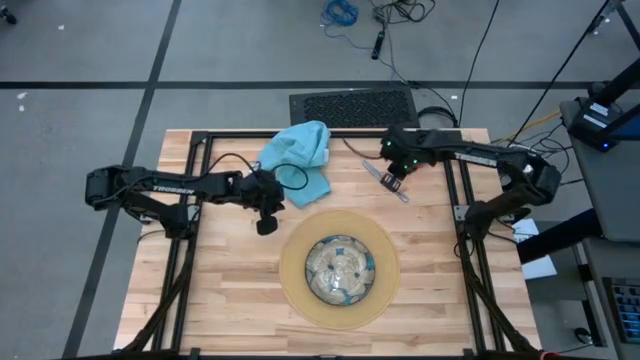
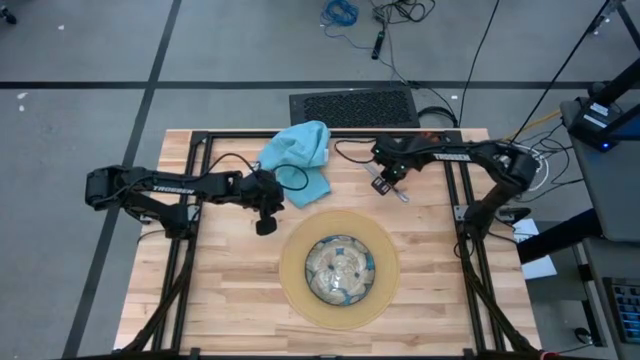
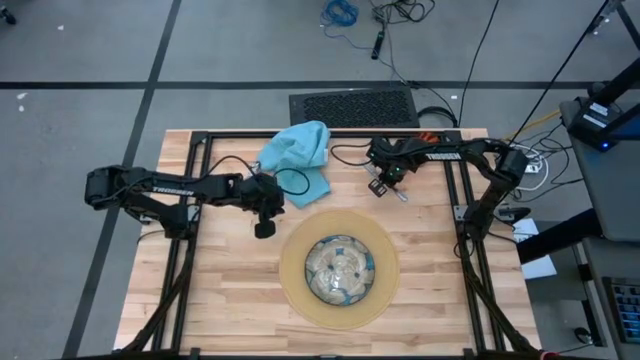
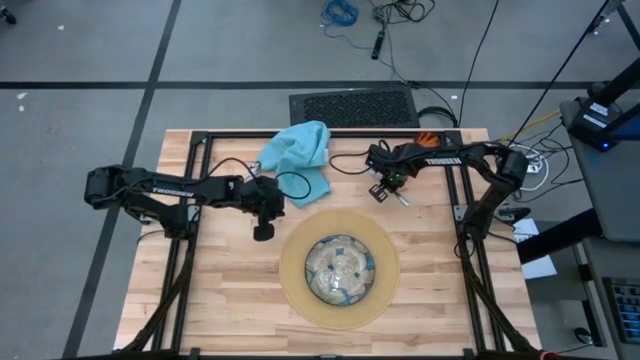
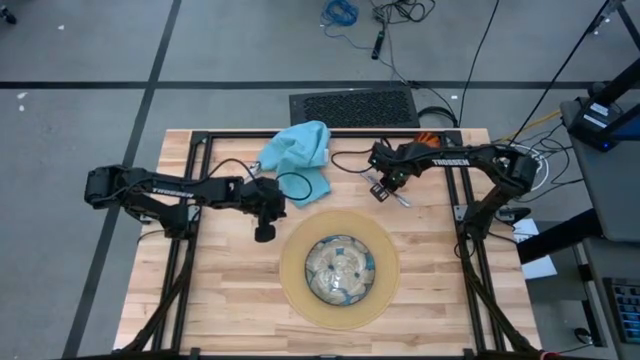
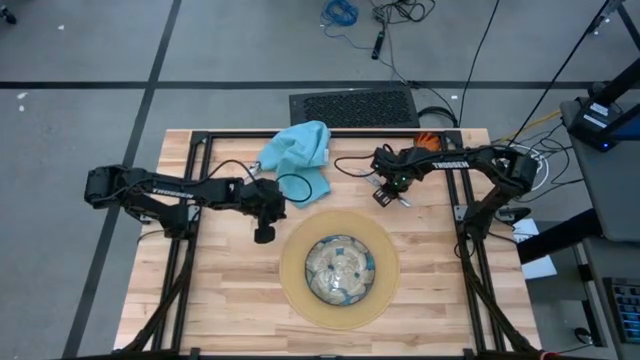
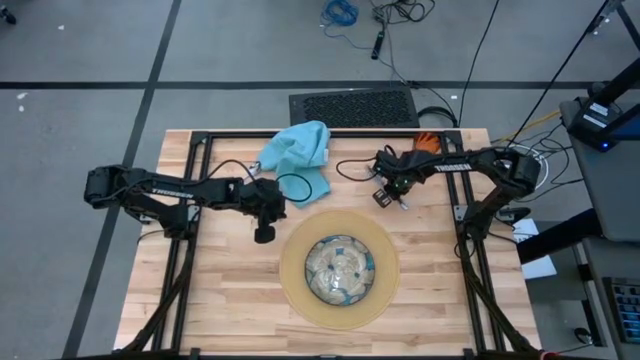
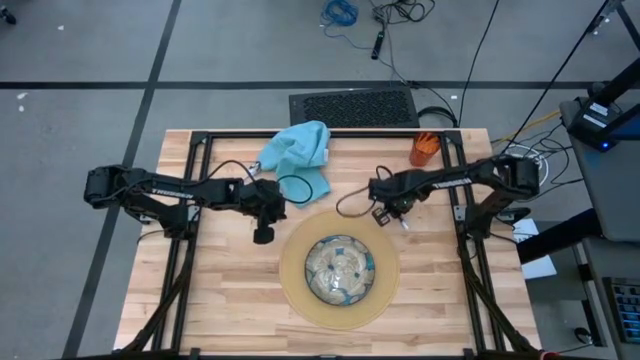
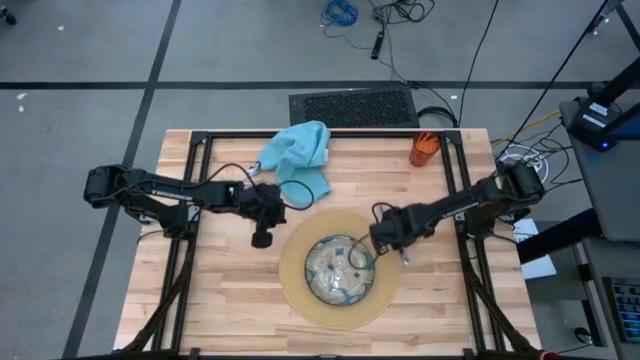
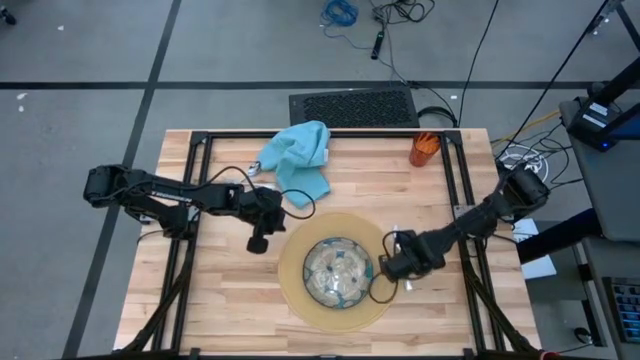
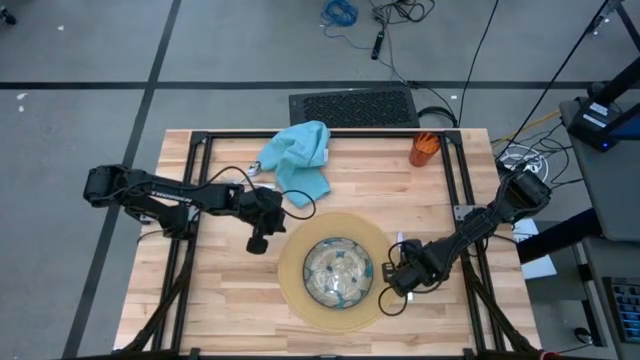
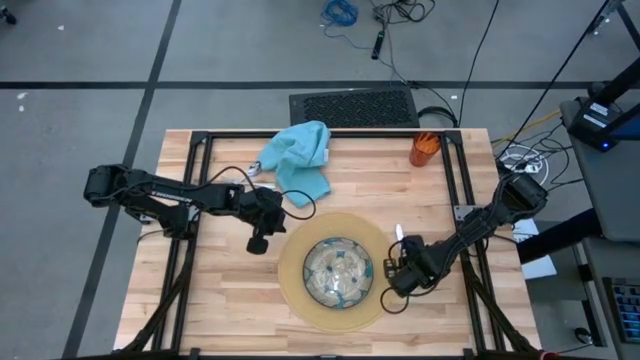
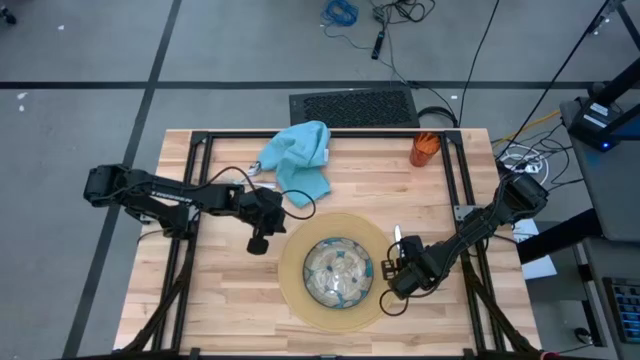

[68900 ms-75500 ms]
Task: Set table place
Move the silver knife beside the brown placemat

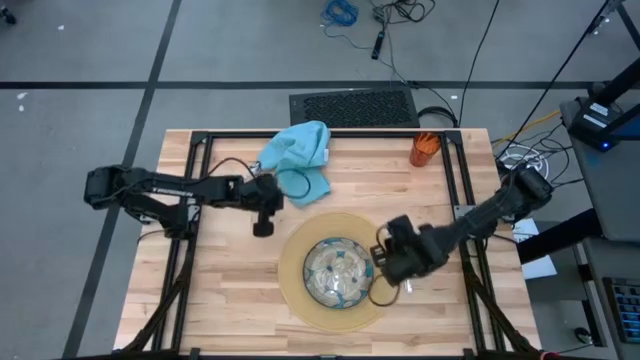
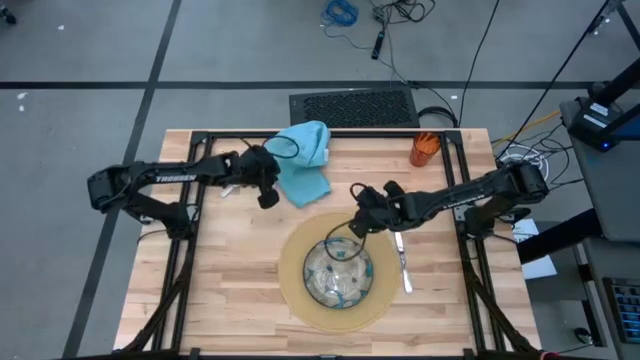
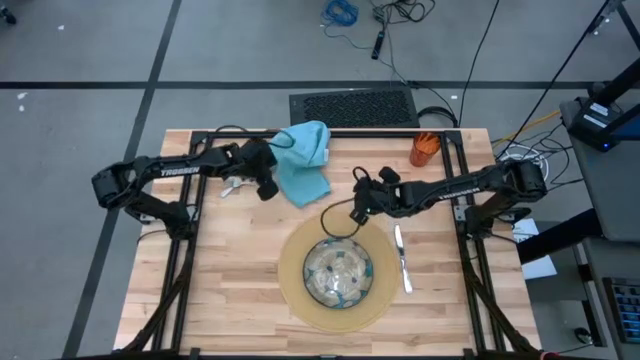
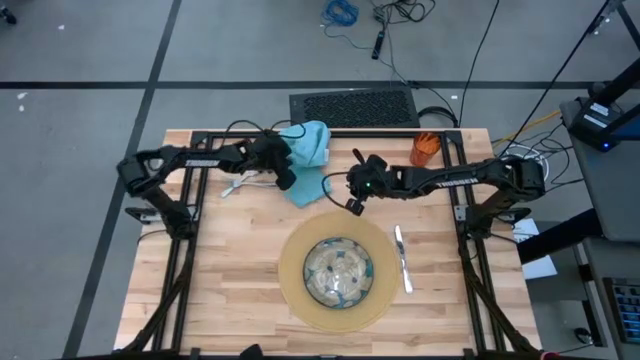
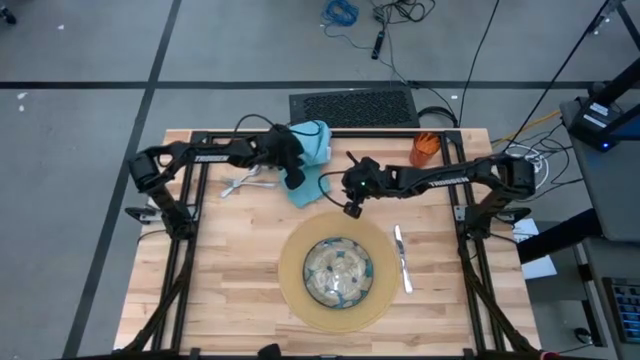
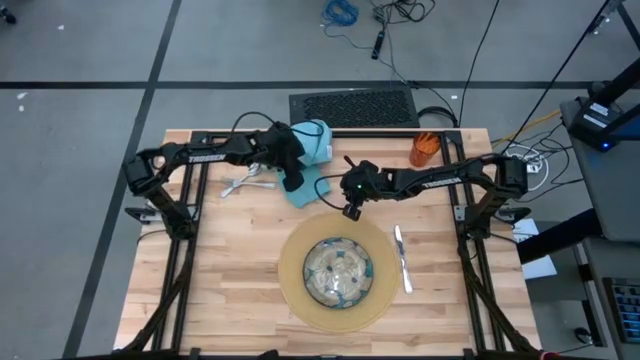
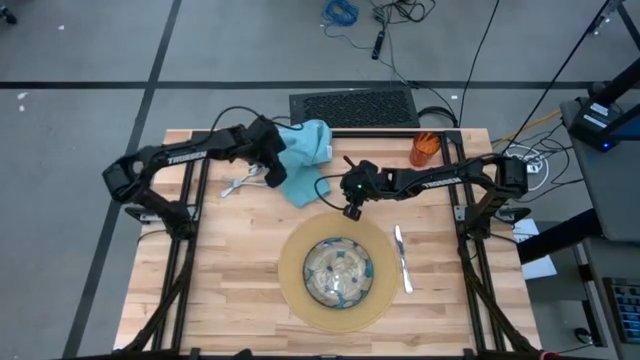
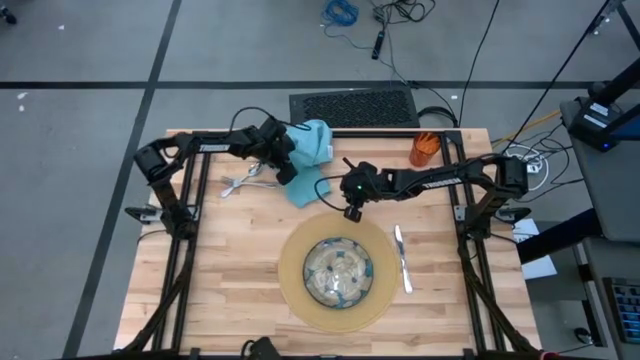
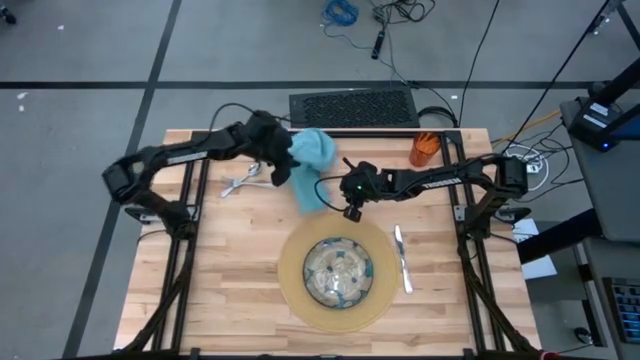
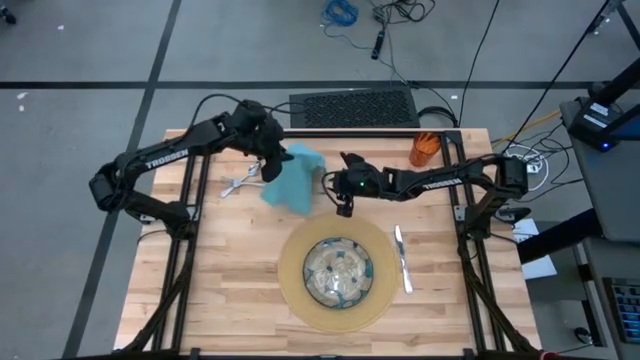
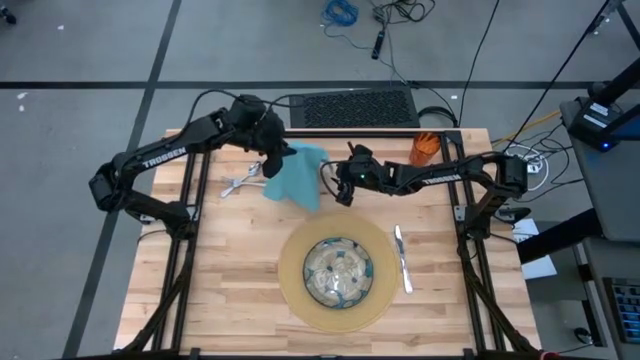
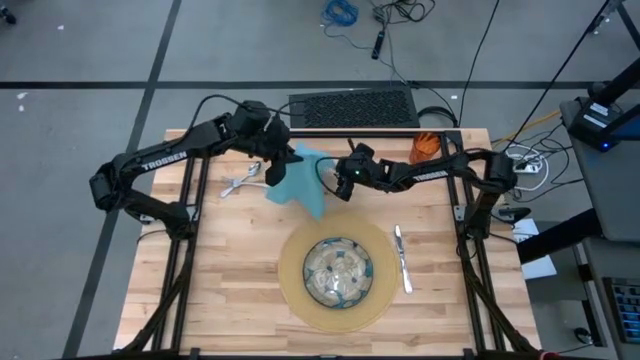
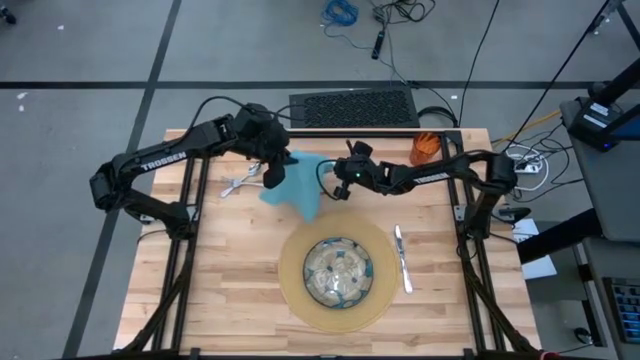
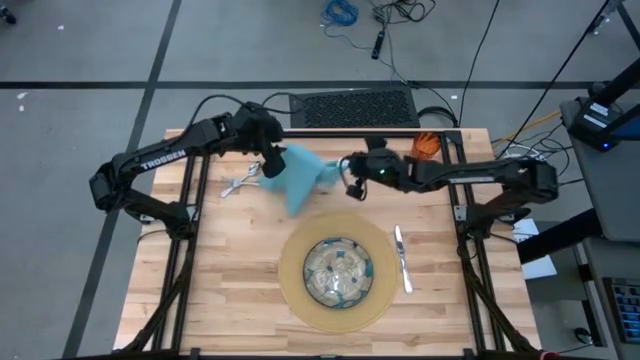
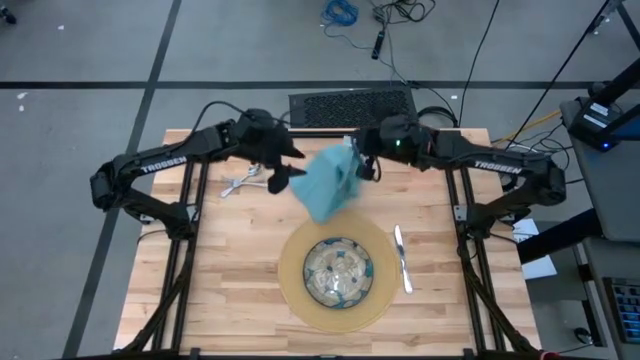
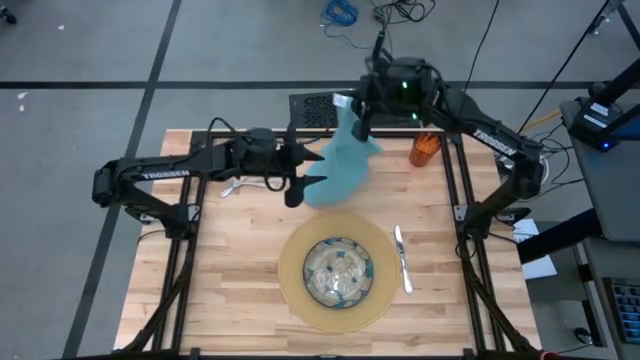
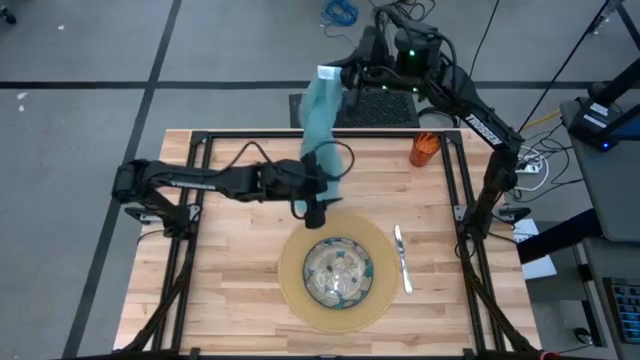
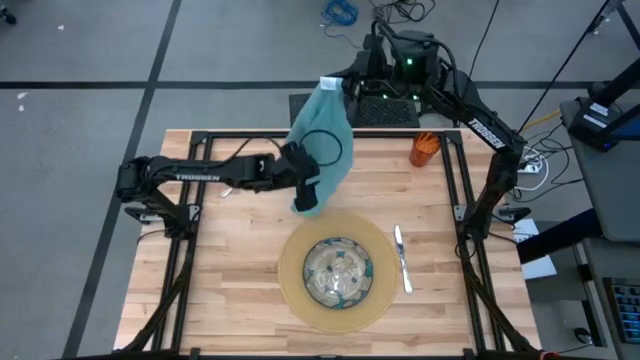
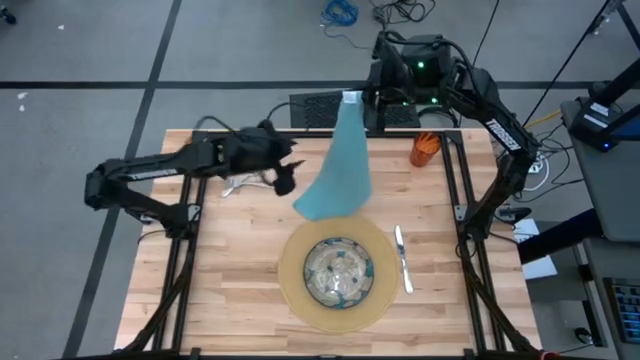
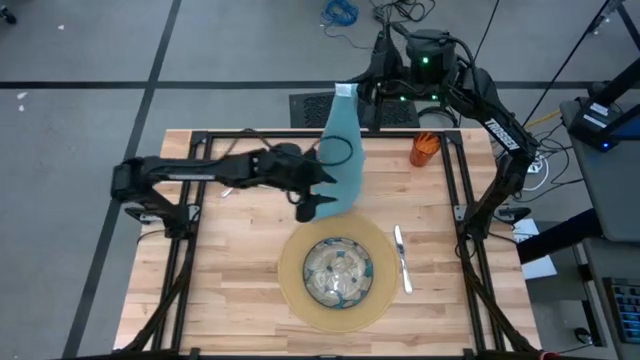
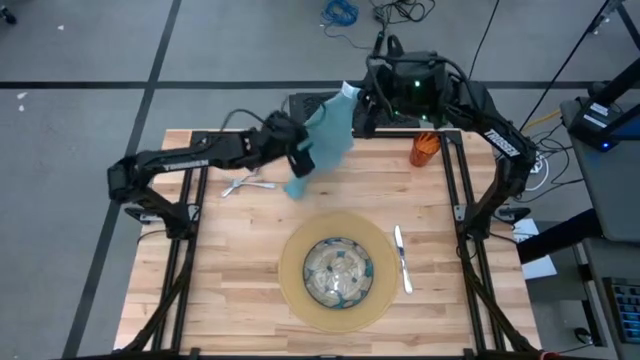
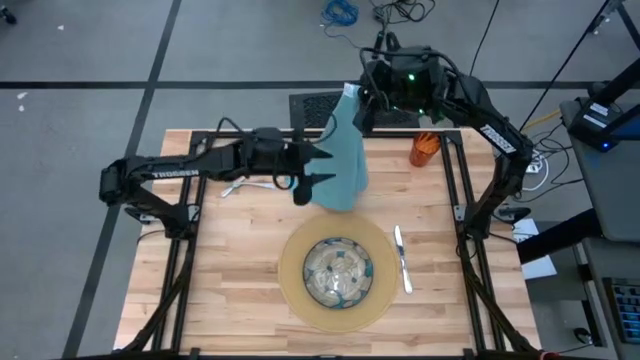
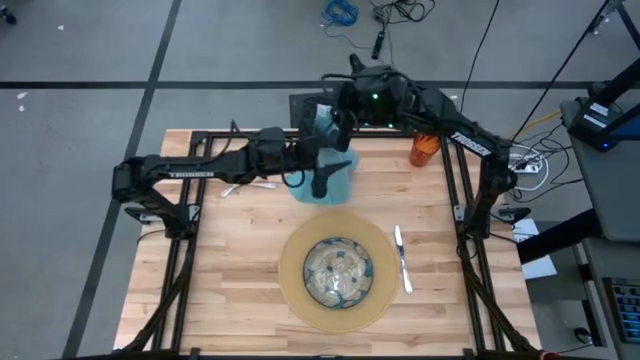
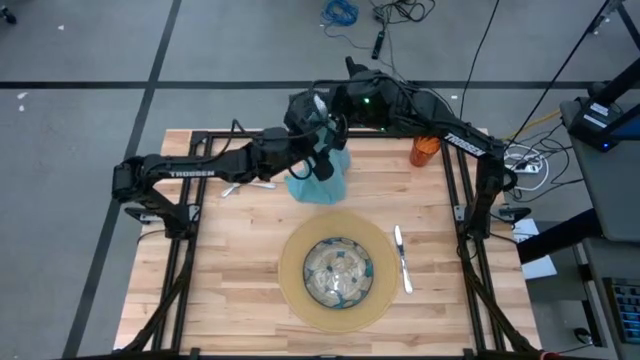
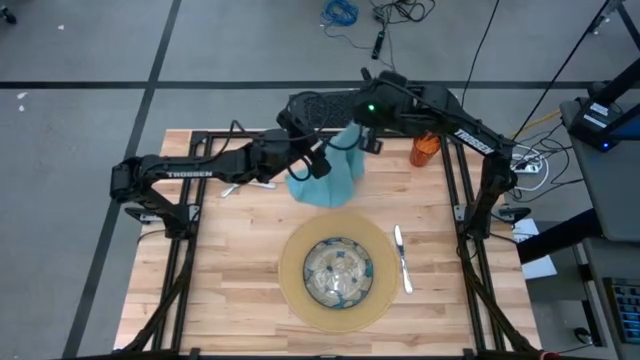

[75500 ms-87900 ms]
Fold the blue napkin

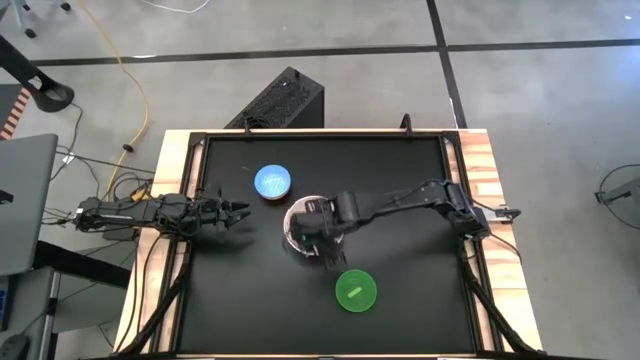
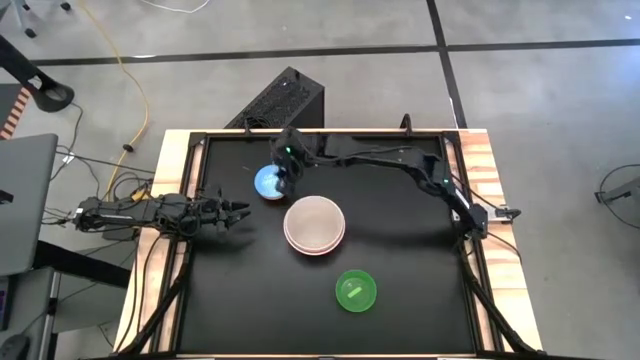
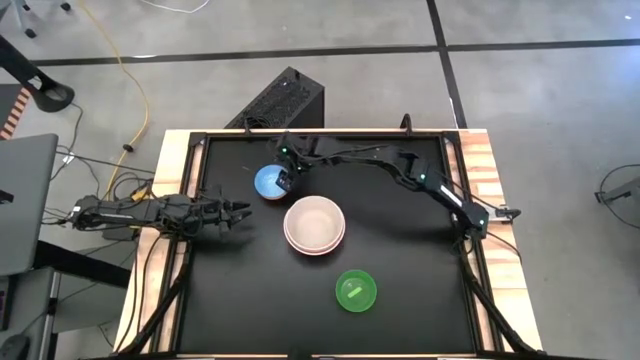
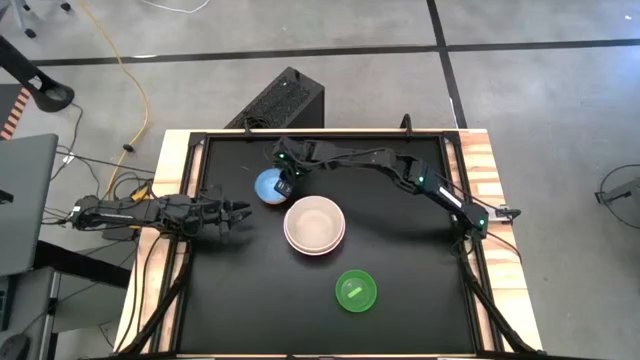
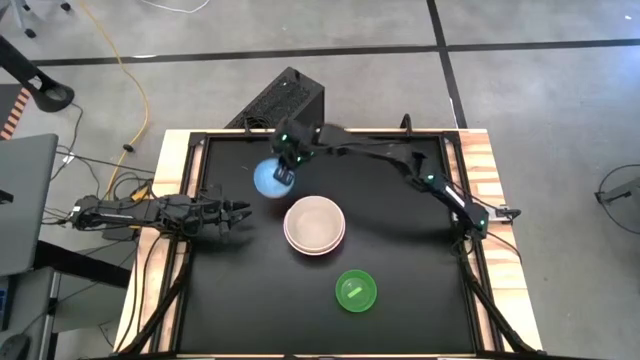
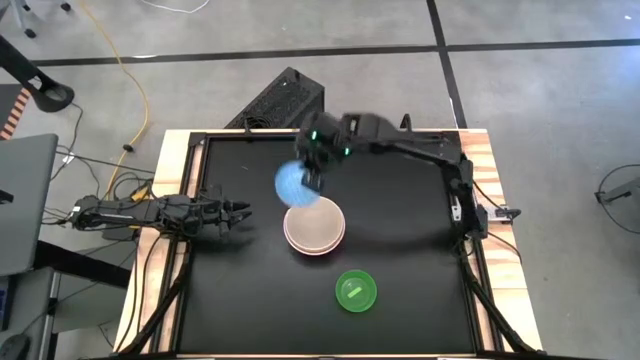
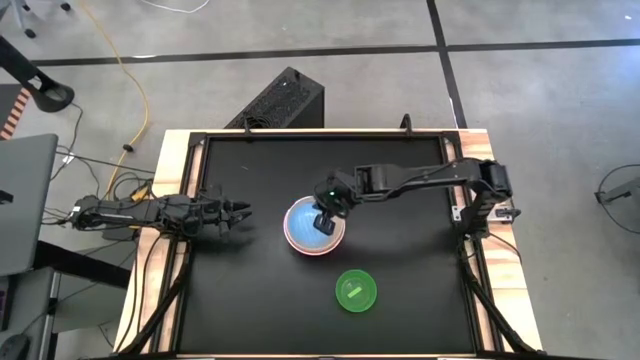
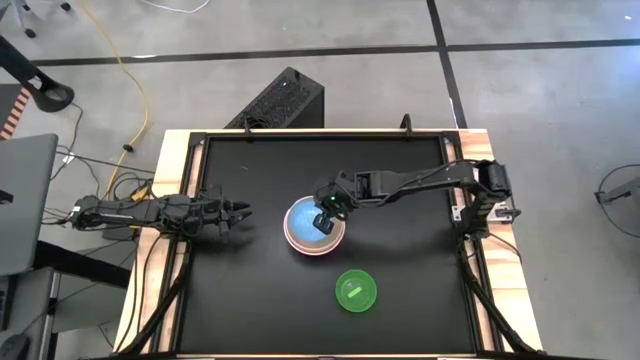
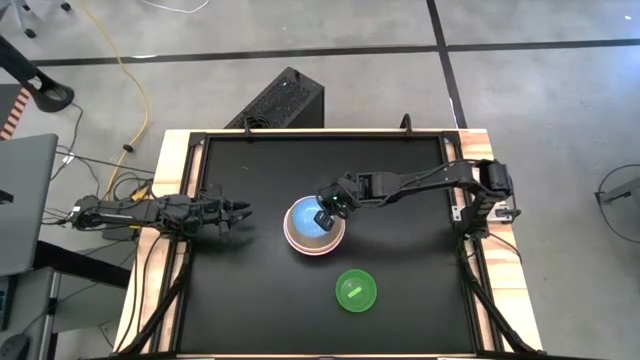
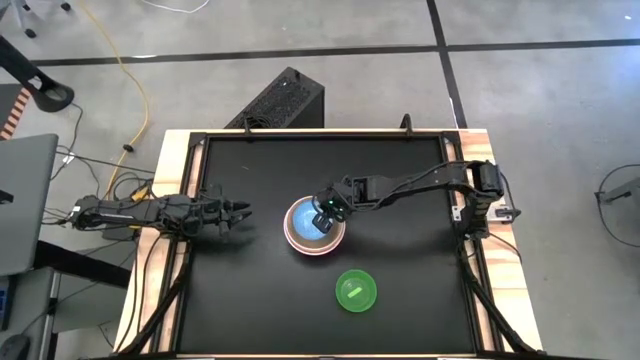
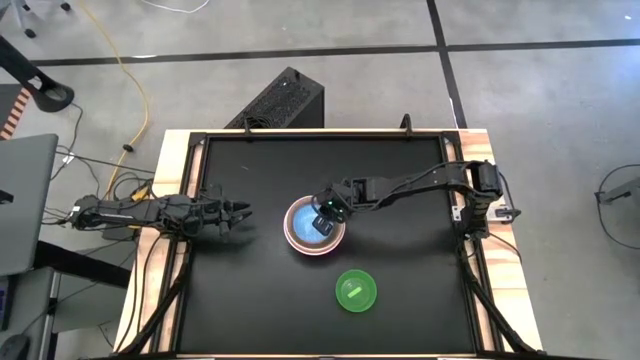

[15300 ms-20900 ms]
Task: Nest bowls inside each other by size order
Stack the blue pattern bowl on top of the gray bowl
